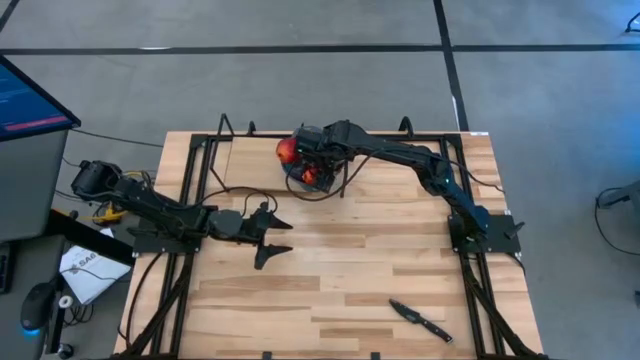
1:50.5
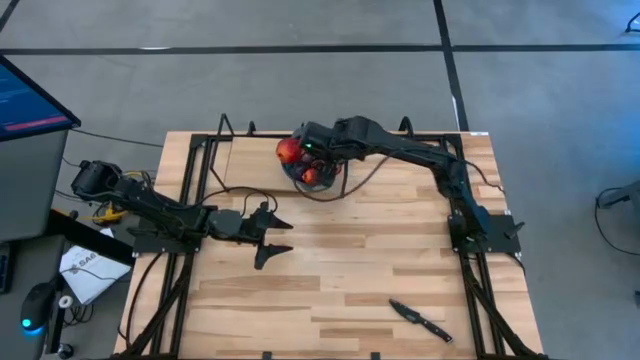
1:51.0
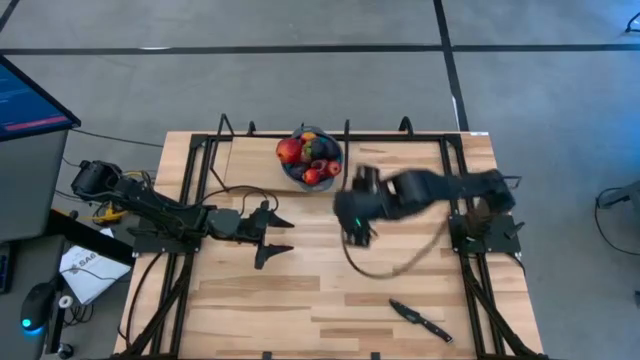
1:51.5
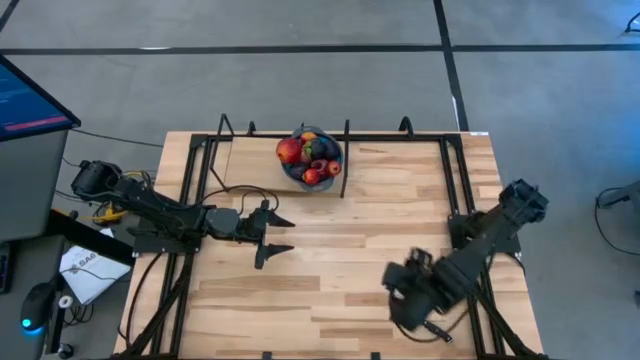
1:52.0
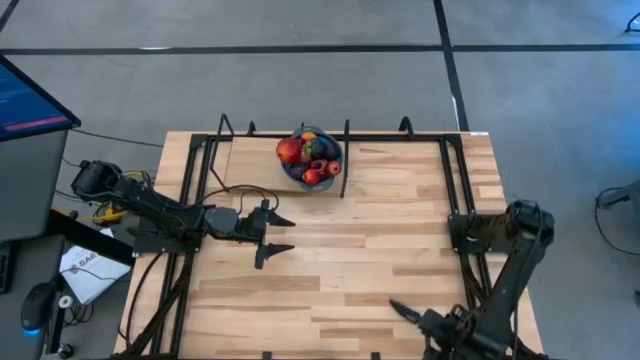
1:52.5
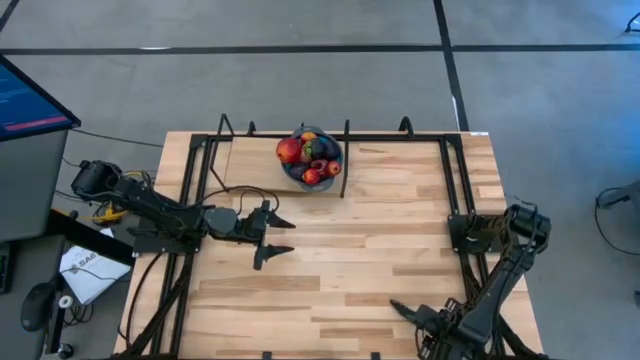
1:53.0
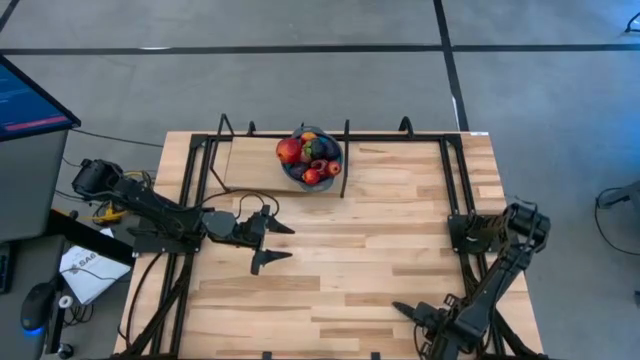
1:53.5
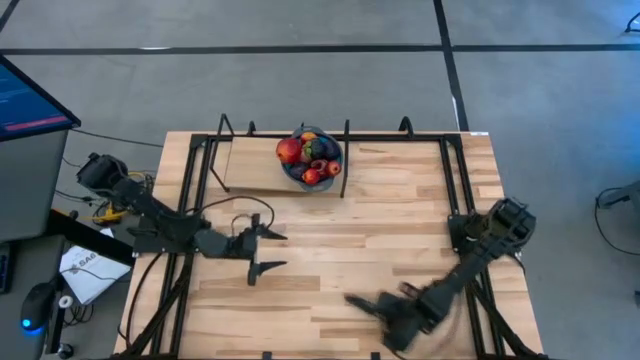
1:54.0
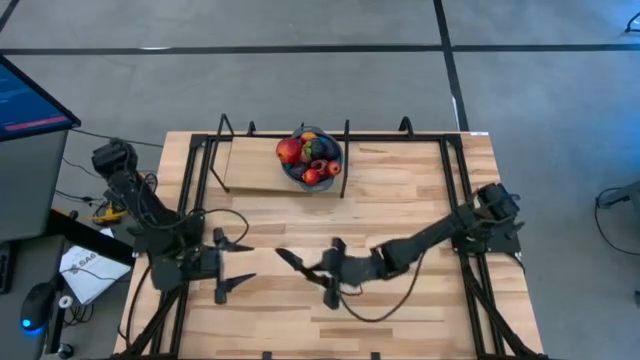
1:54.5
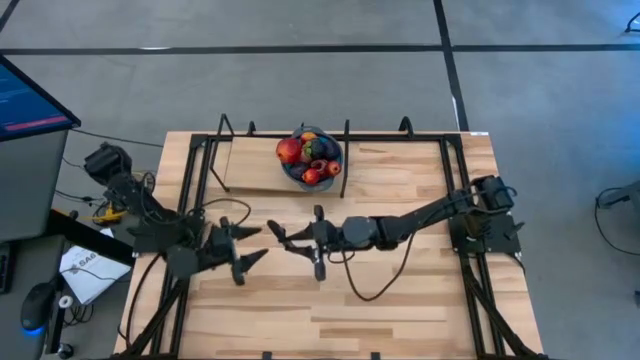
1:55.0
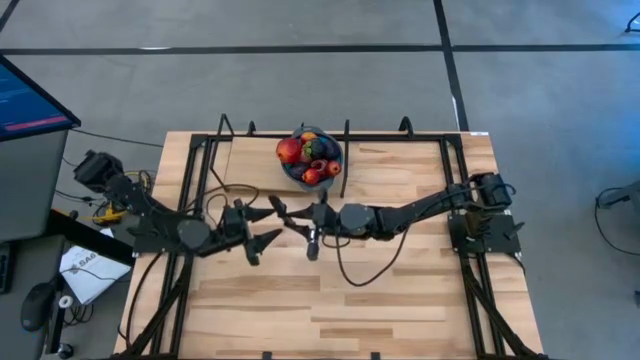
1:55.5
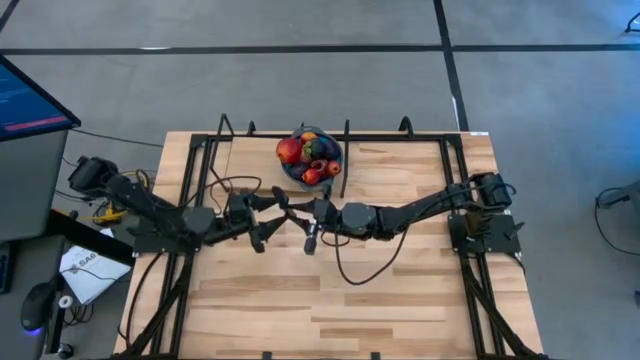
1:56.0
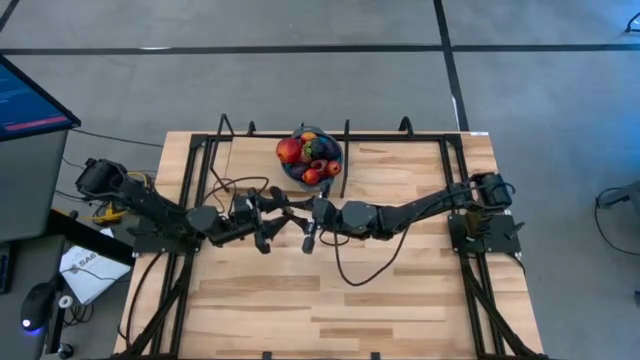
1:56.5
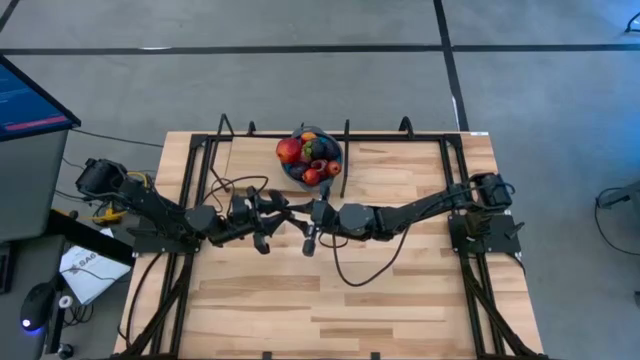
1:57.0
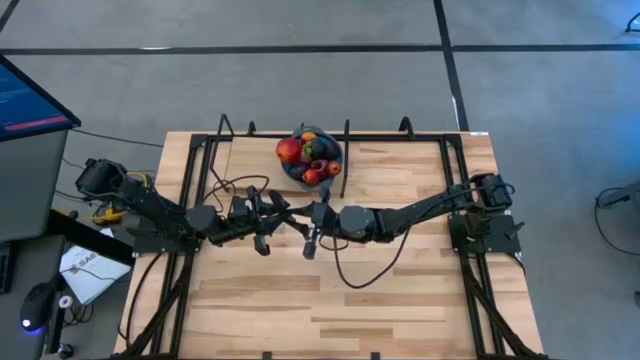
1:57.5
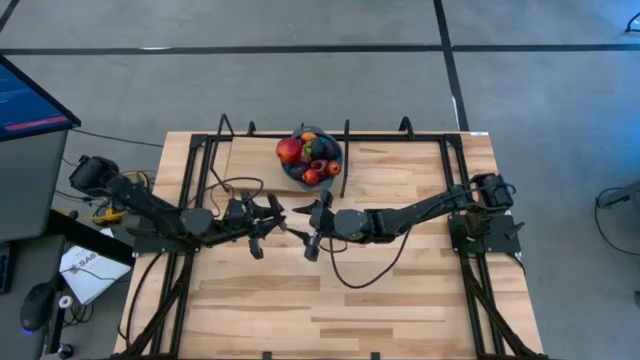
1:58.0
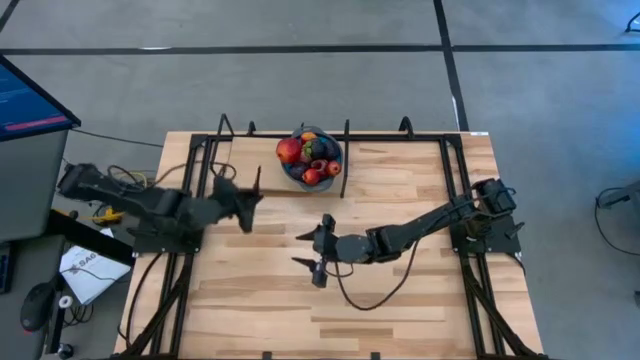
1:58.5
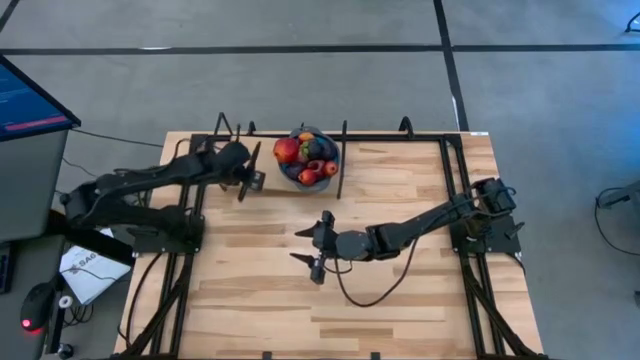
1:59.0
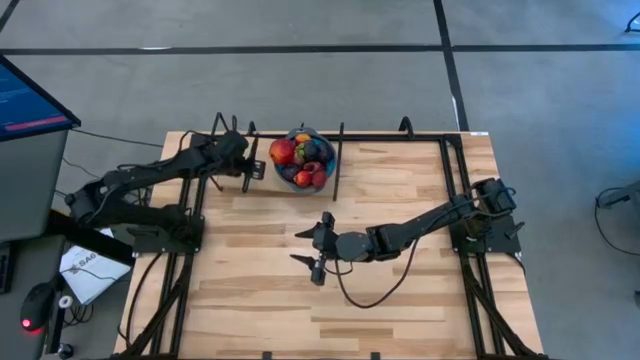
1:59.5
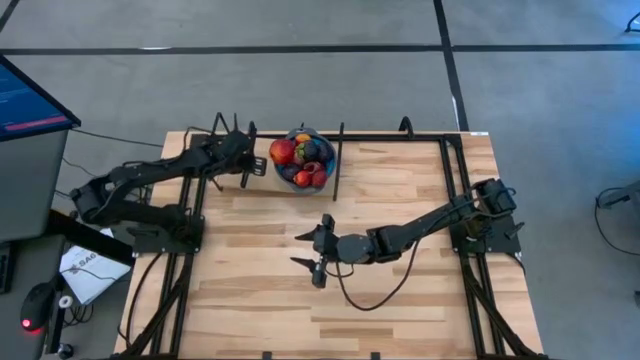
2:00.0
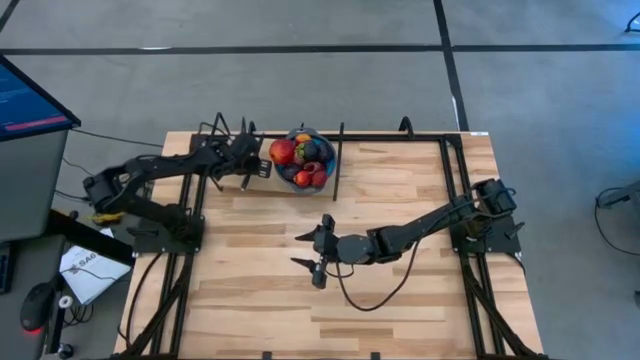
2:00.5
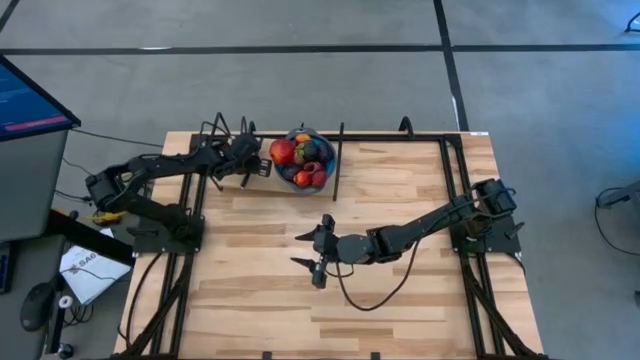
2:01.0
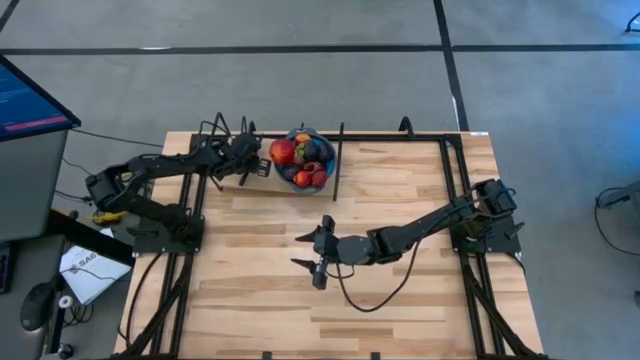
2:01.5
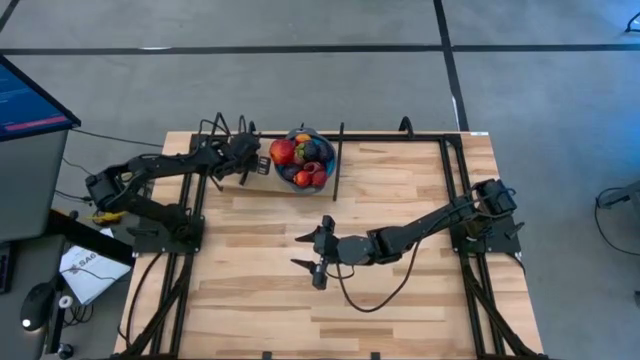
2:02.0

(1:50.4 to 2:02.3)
Task: Pick & Place Fruit
Put the black knife on the shelf

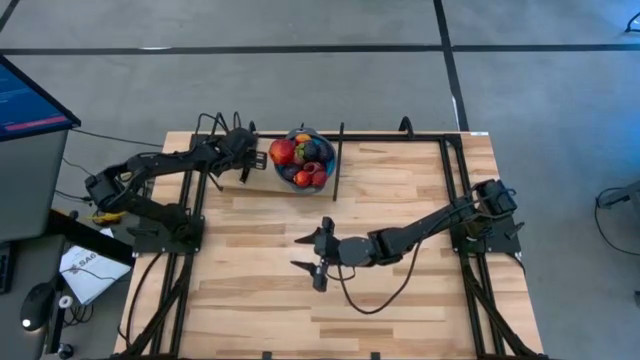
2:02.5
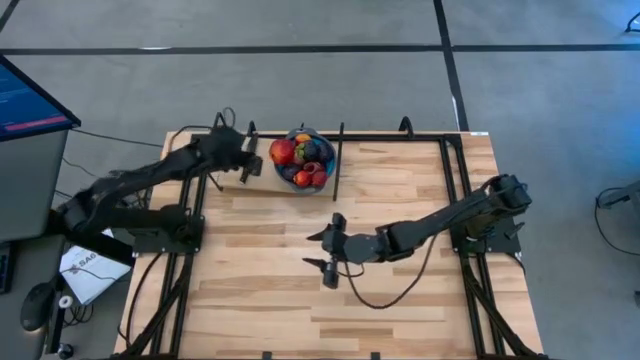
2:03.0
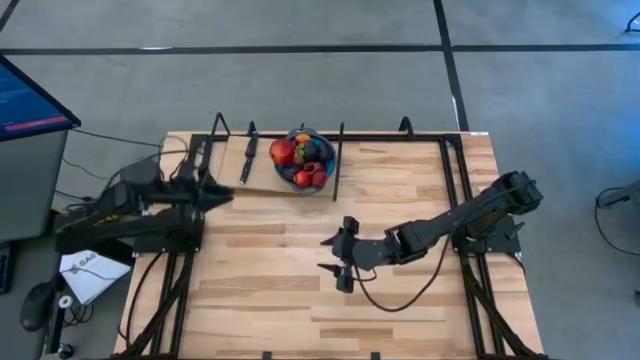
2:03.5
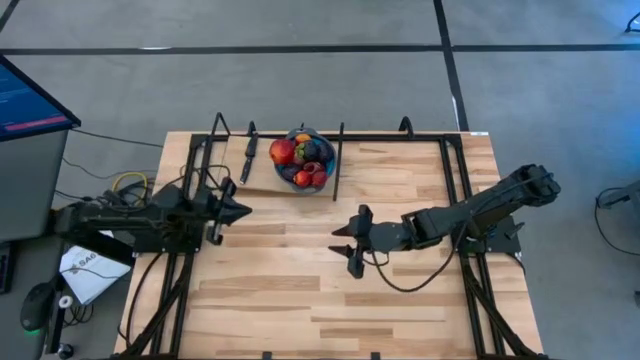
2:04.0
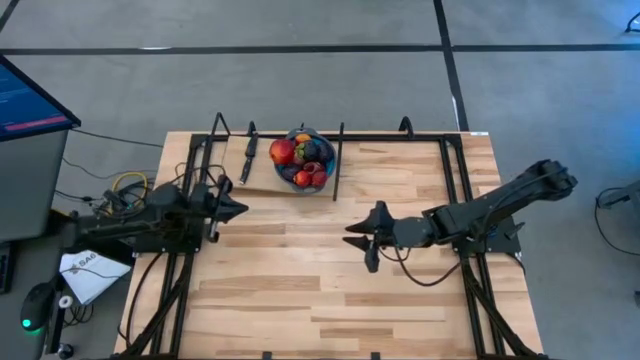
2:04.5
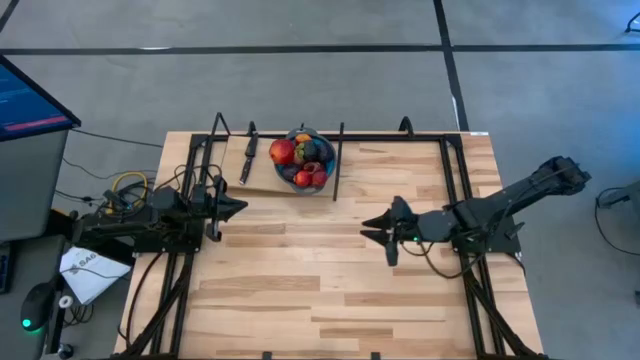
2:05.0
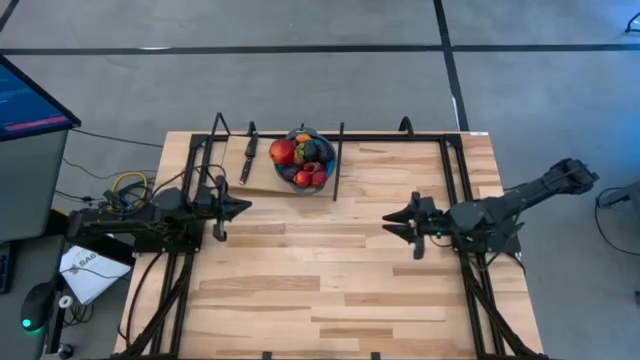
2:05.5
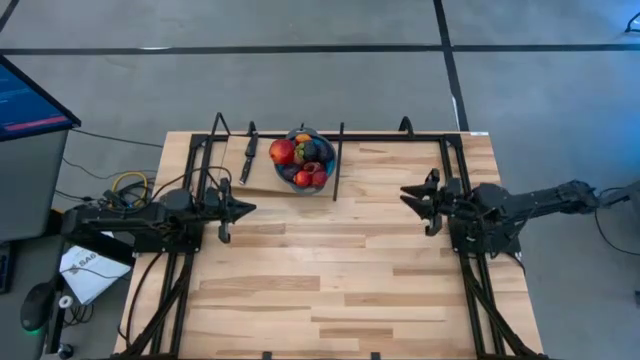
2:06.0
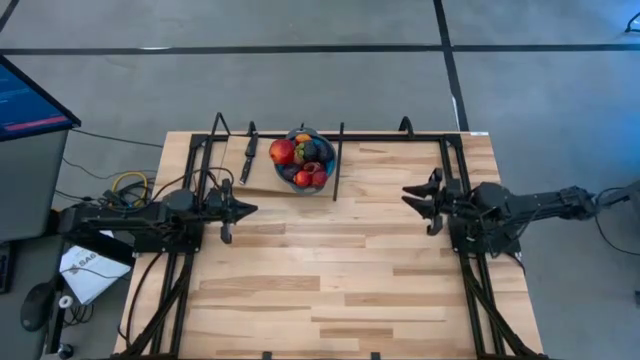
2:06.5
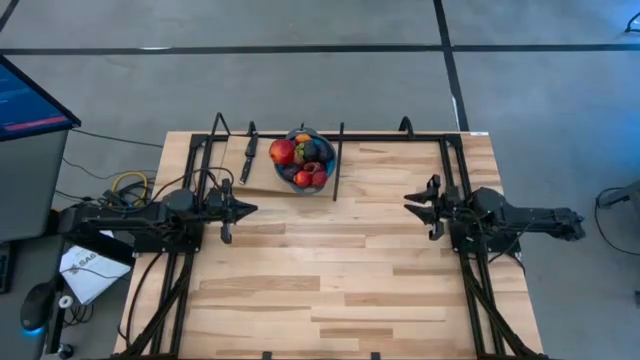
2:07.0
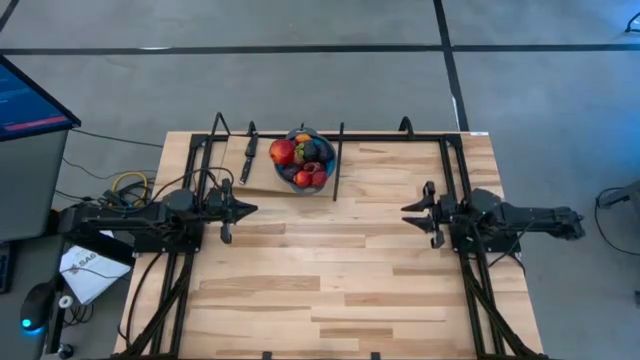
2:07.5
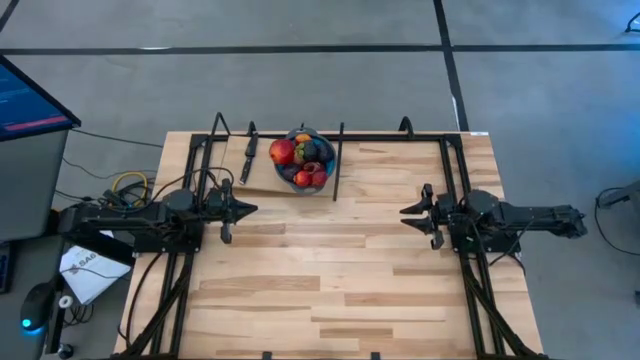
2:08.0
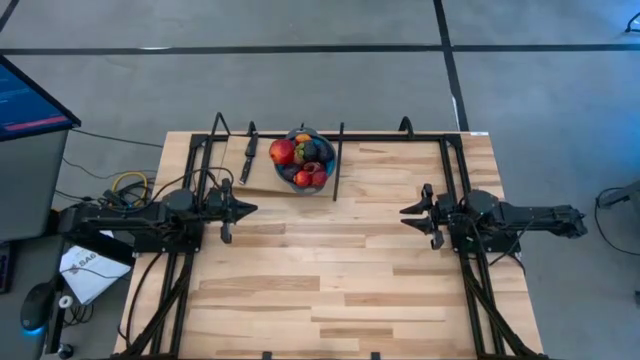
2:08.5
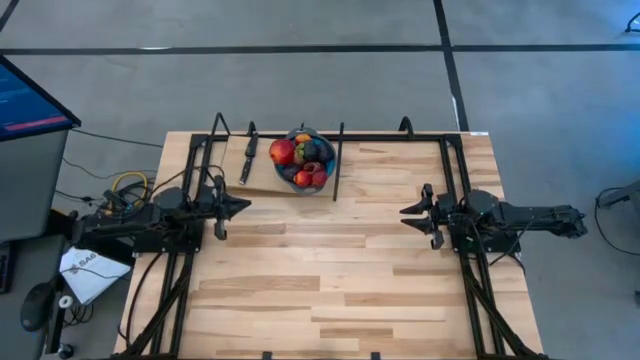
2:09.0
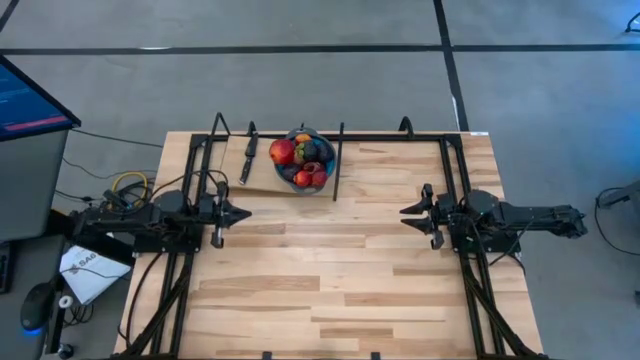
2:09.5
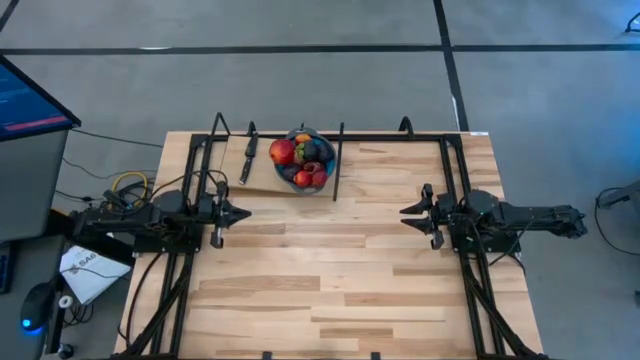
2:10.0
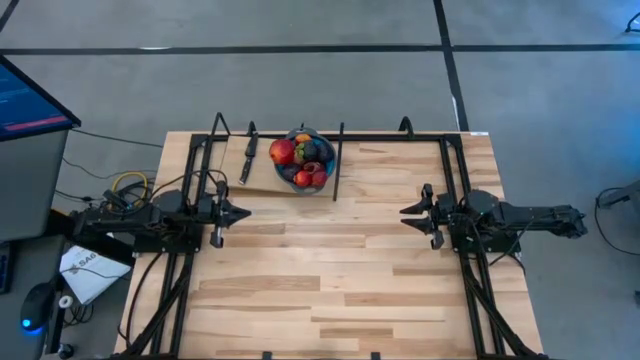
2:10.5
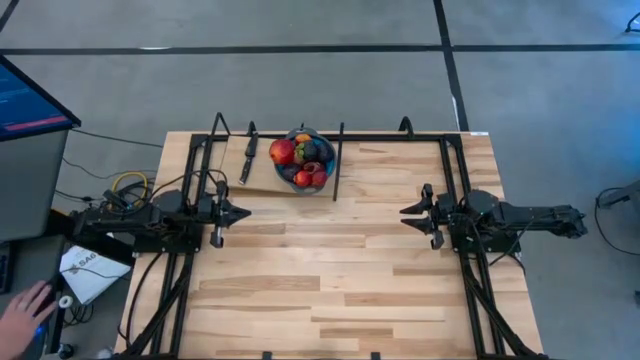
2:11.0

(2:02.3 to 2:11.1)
Return to Home Position

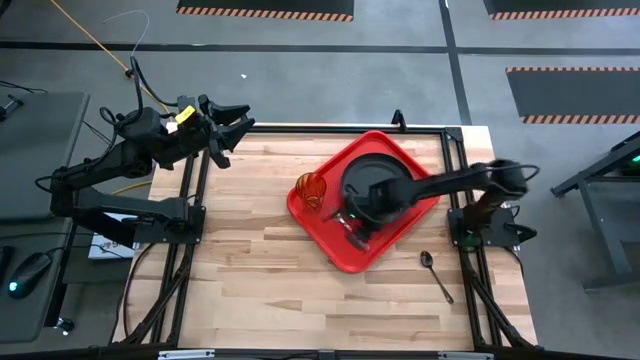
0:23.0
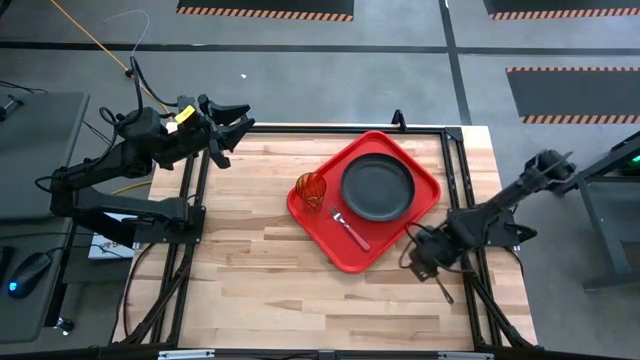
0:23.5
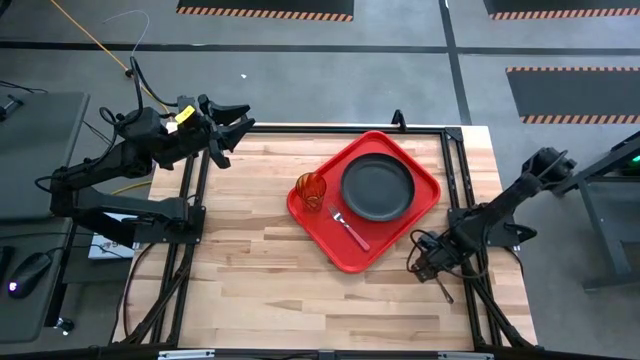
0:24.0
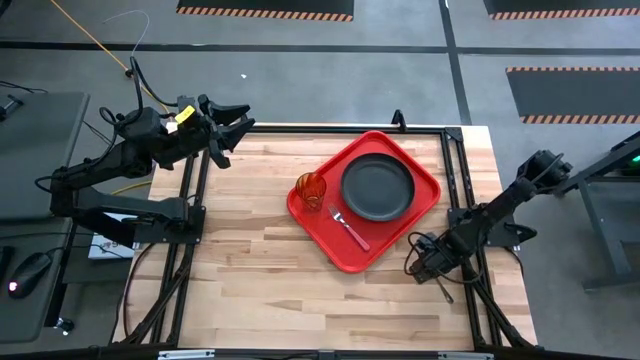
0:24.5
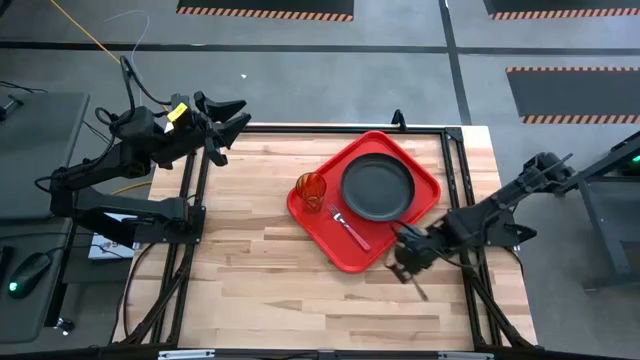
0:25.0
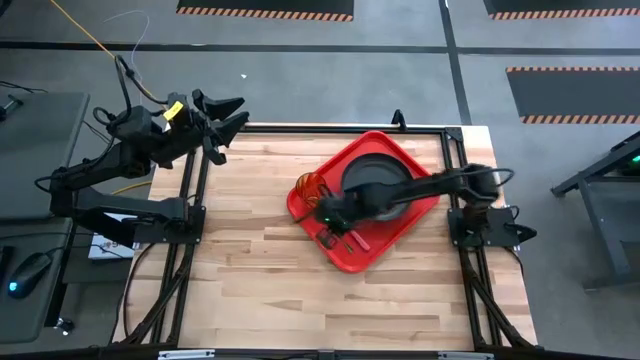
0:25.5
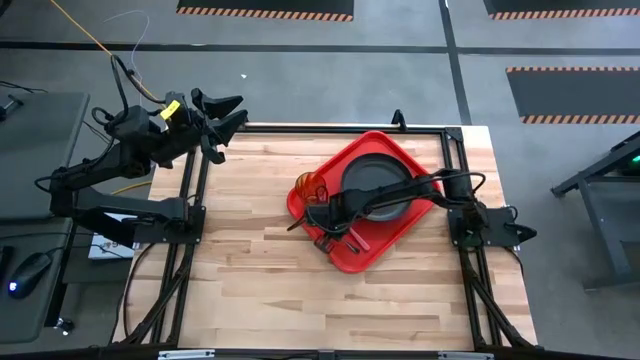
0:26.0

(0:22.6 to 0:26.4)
Task: Pick and place plate/cup/fork/spoon on tray
Put the black spoon on the orange serving tray to the left of the pink fork
